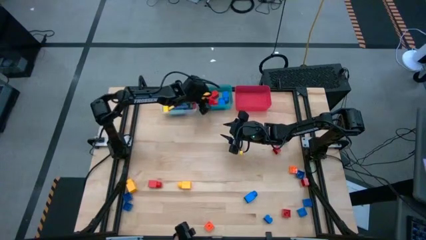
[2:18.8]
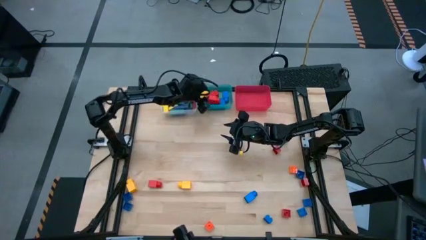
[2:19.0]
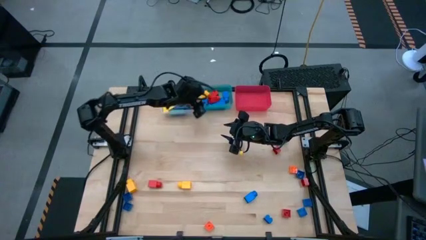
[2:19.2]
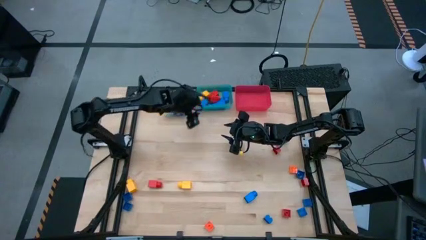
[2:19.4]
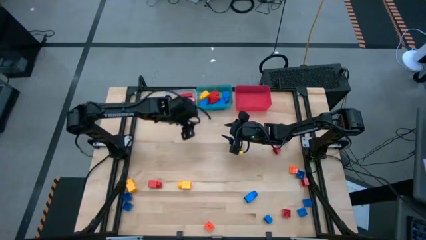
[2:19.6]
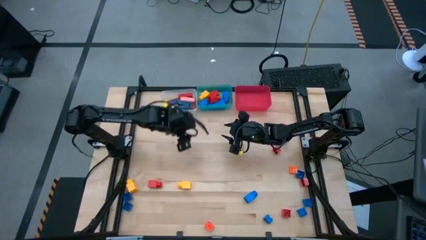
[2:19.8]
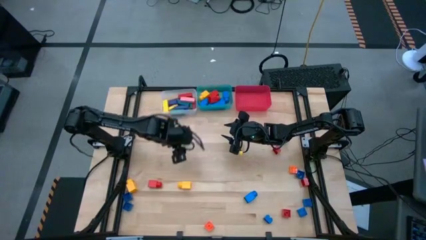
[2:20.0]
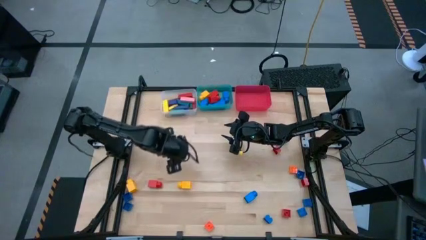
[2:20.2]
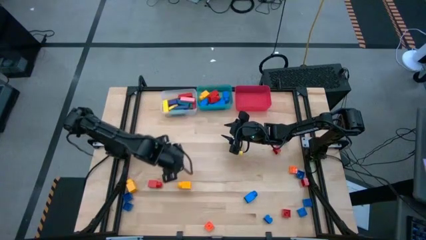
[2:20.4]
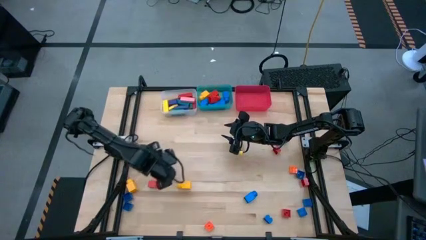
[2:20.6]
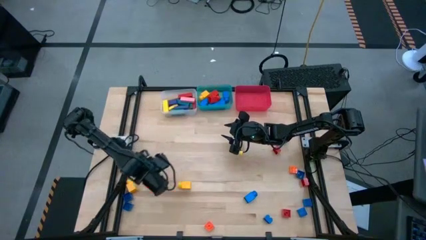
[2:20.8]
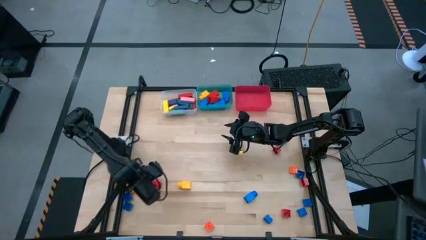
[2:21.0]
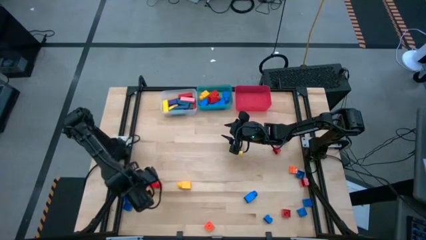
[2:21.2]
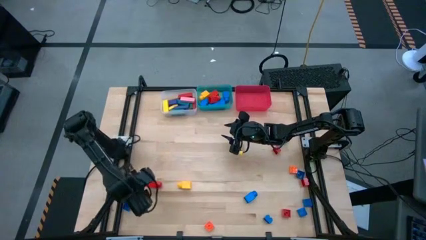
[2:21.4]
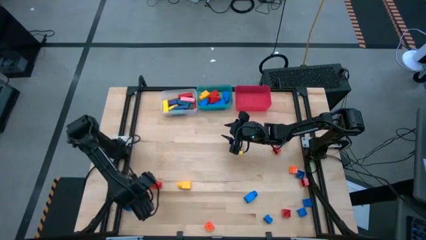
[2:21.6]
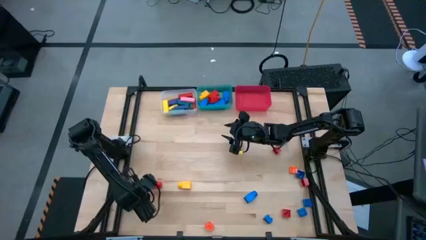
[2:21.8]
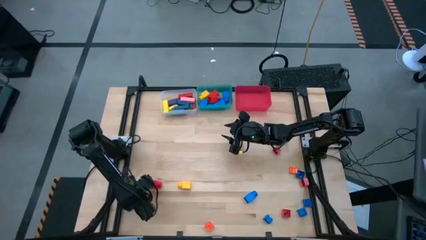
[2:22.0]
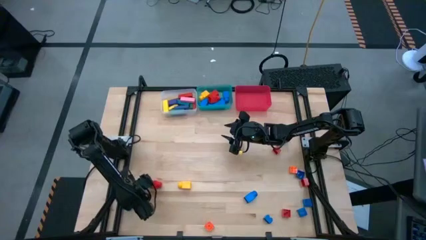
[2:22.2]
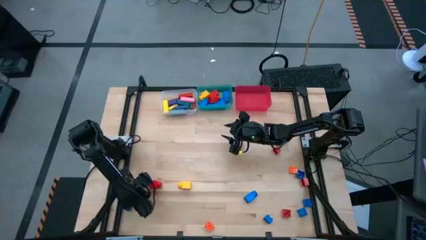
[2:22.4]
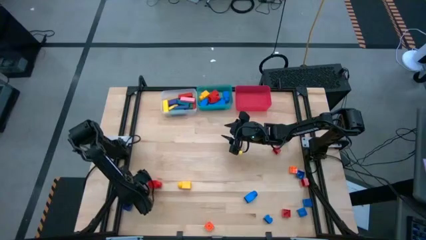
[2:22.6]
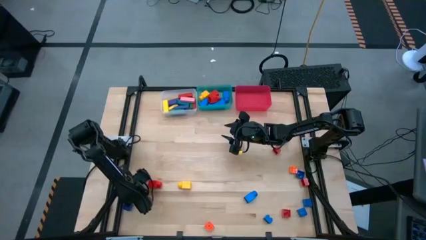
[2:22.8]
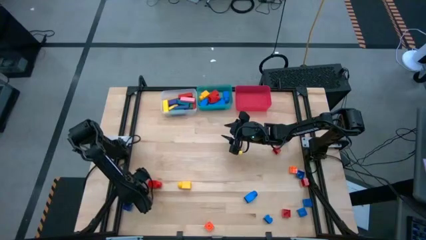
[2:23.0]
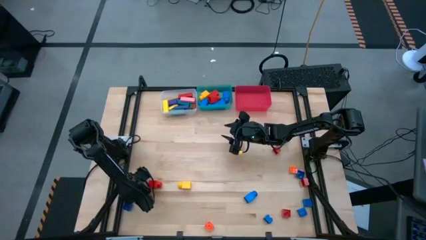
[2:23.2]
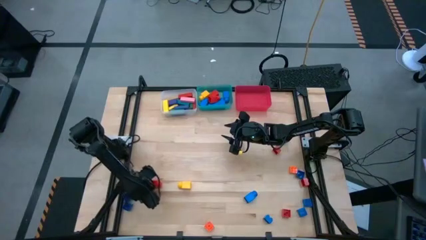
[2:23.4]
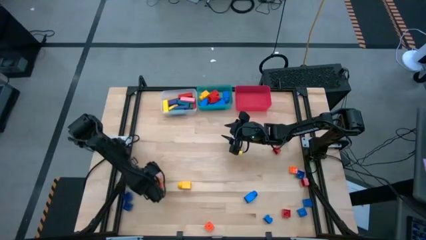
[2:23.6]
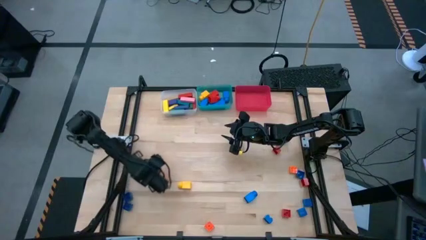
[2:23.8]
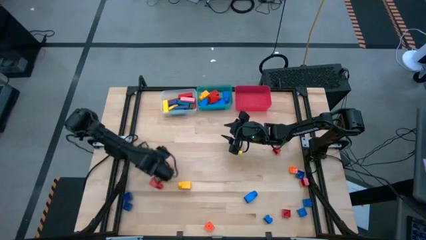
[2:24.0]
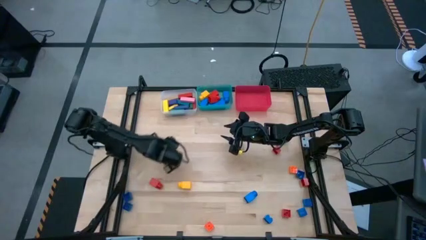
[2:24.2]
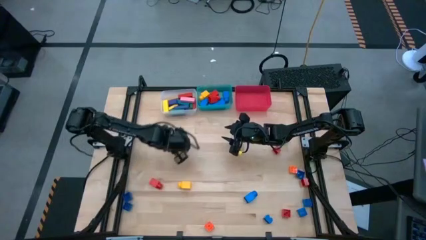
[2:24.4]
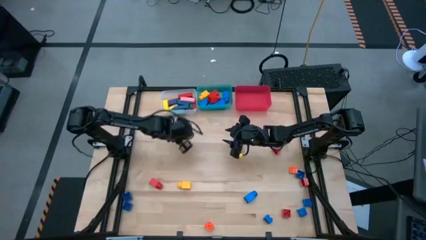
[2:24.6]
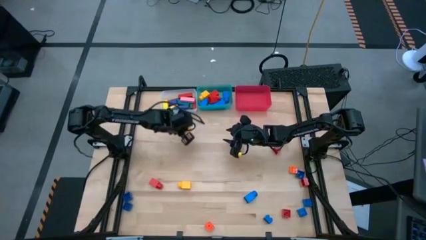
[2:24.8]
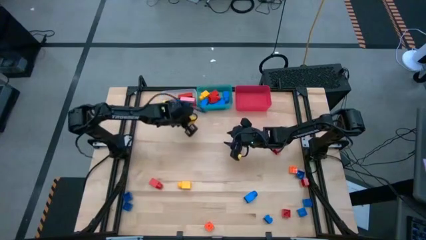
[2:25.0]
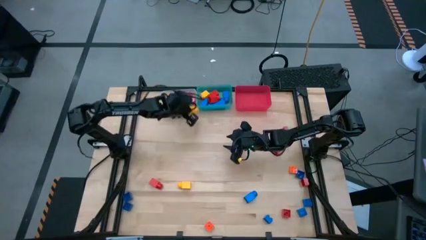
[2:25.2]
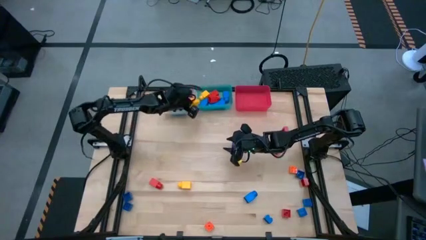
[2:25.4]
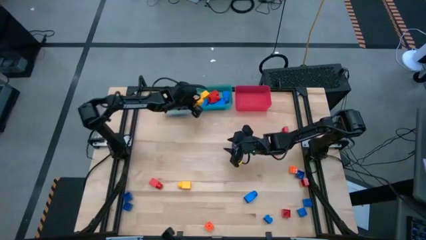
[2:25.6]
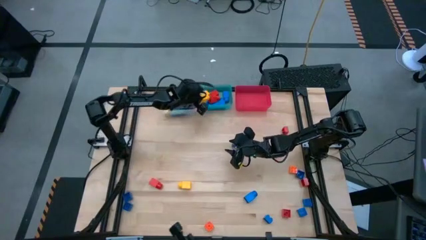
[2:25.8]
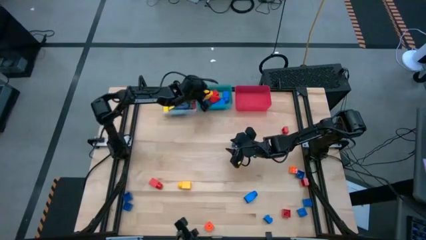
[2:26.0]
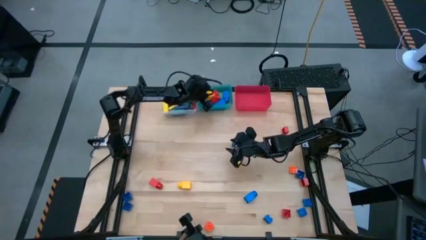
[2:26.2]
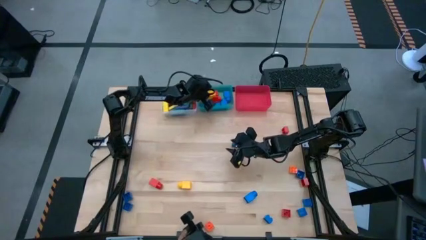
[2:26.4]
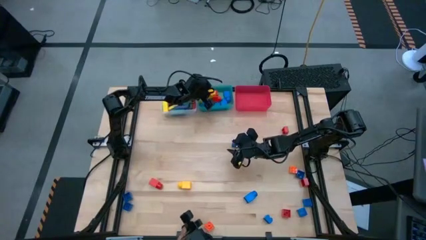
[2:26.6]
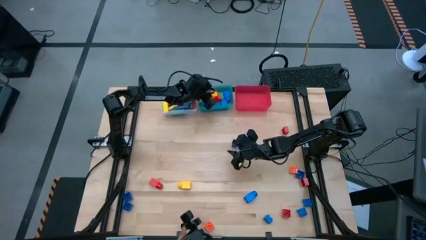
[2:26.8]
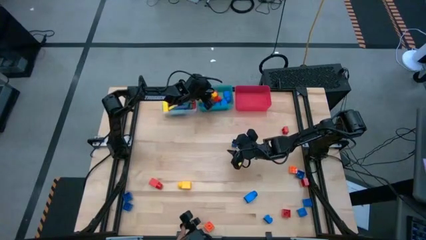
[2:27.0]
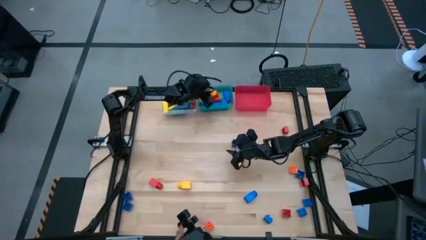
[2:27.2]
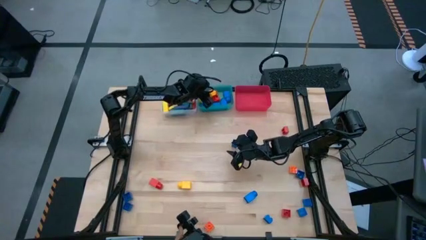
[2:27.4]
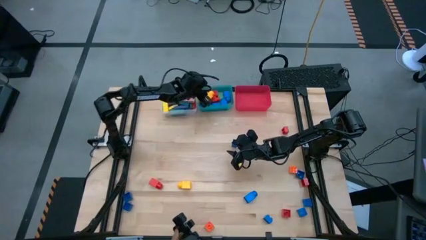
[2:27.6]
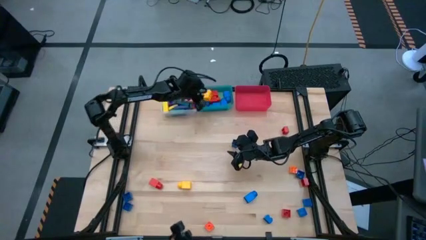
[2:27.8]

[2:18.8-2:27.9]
Task: Sort blocks by size
Put the yellow 1 stud game piece into the green bin

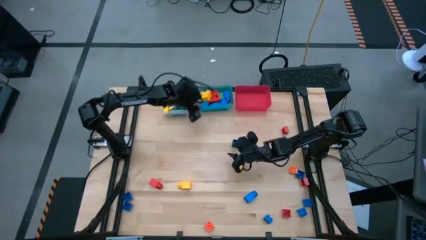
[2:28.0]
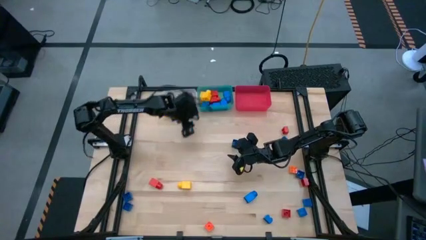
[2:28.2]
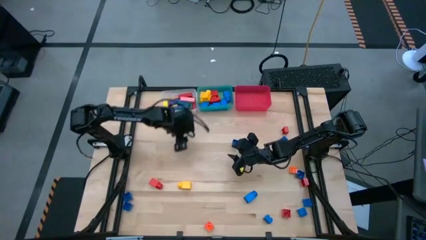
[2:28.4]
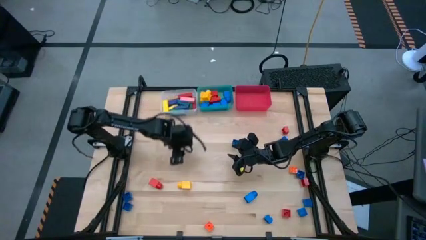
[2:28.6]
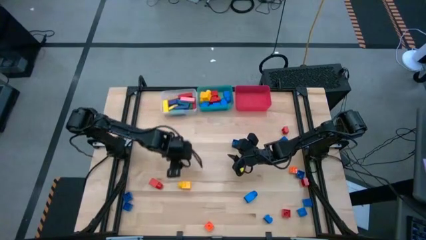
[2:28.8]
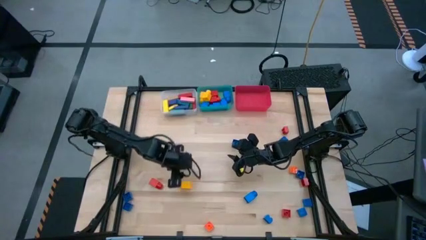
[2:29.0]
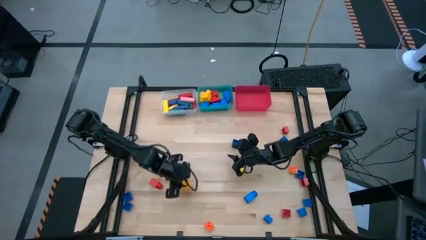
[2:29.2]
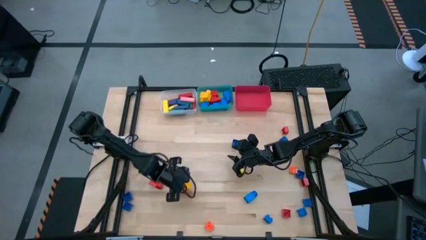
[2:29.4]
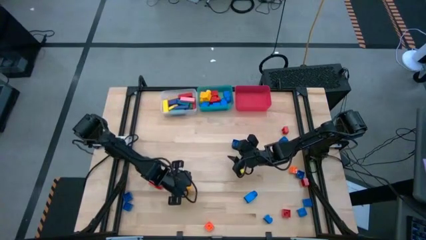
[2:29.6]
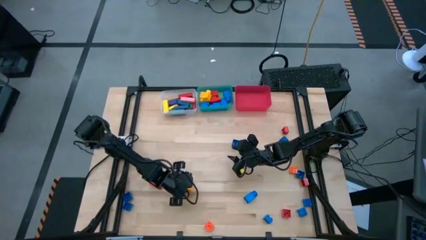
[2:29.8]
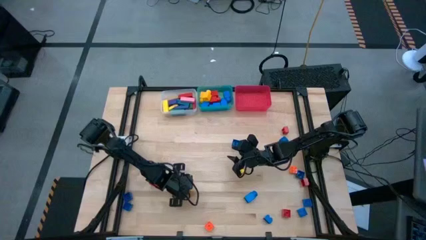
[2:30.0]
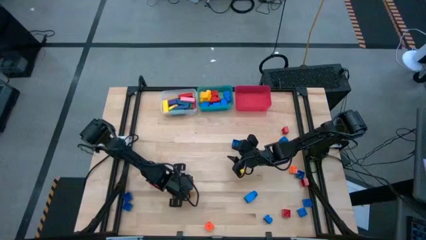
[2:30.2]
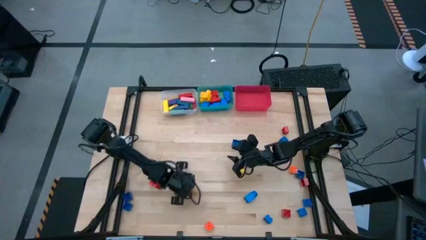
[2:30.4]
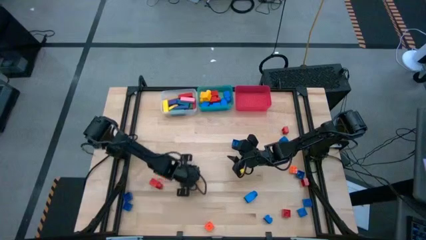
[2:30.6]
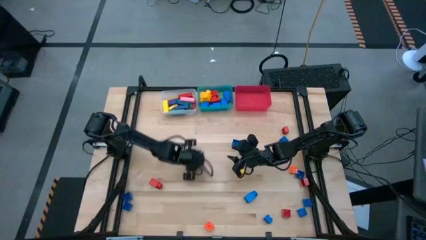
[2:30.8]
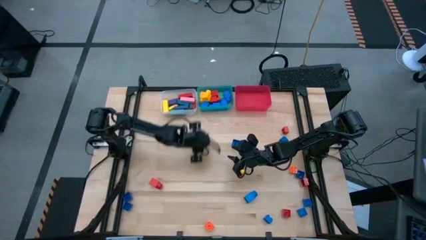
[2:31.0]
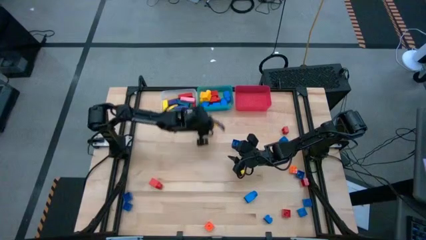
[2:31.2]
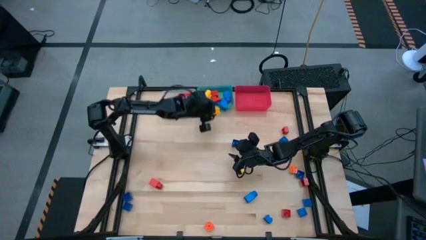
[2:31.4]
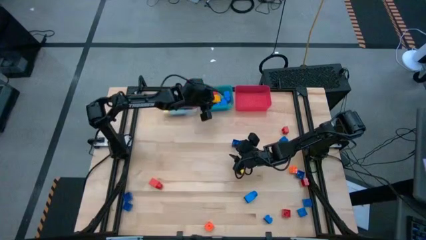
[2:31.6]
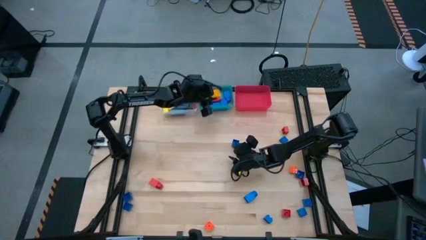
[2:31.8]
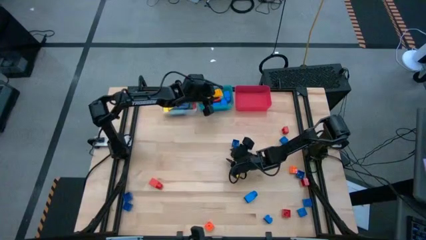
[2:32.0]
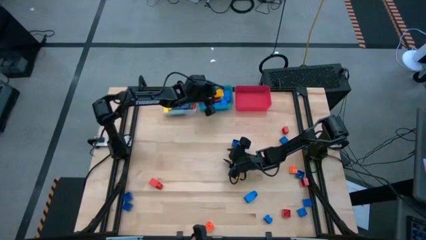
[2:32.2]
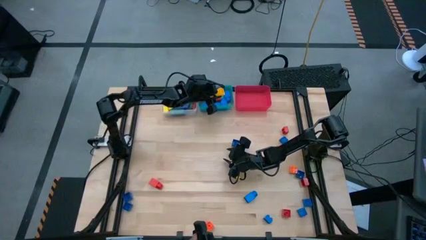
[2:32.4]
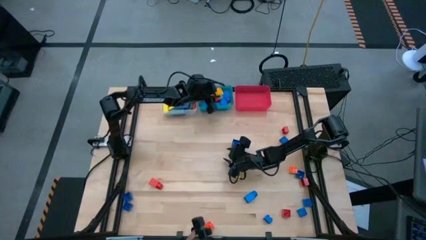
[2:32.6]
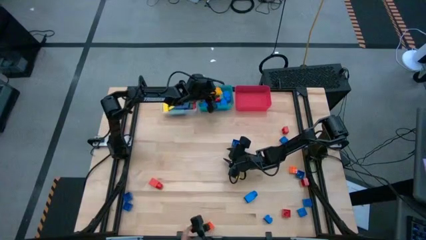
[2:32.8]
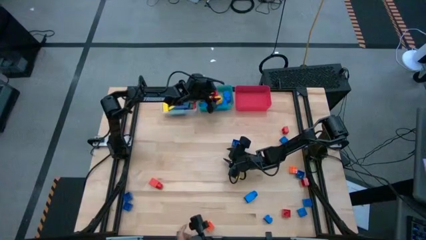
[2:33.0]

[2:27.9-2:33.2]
Put the yellow 1 stud game piece into the green bin

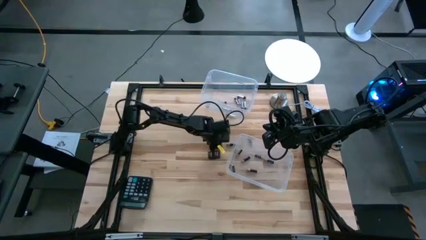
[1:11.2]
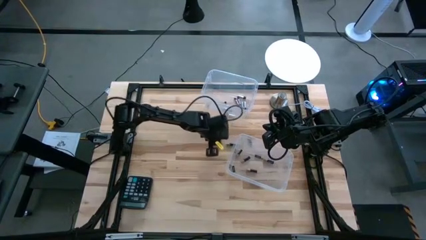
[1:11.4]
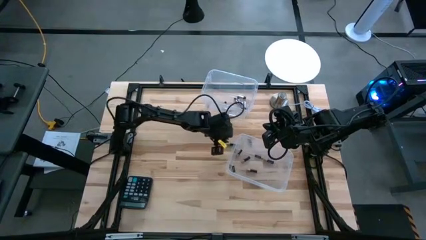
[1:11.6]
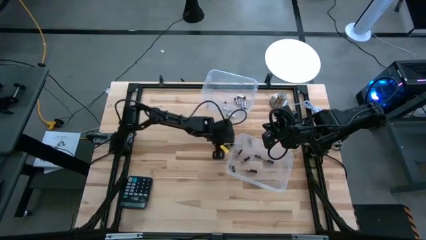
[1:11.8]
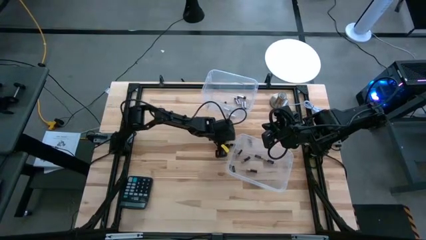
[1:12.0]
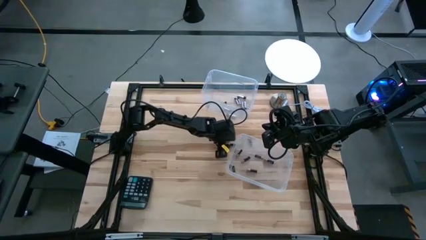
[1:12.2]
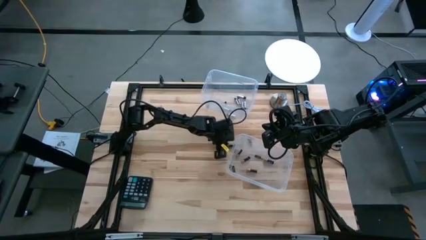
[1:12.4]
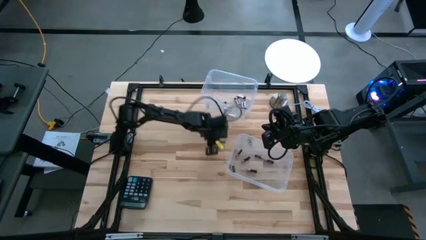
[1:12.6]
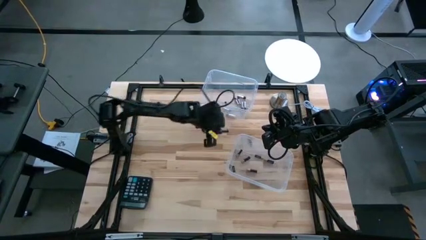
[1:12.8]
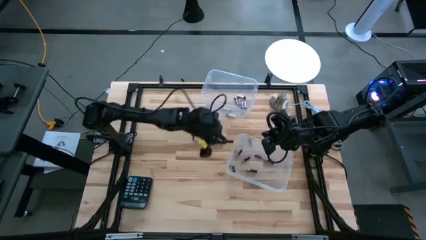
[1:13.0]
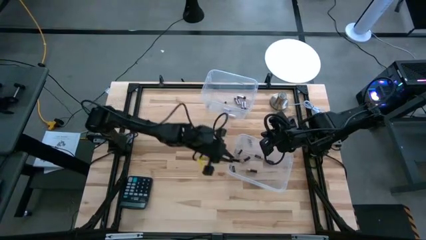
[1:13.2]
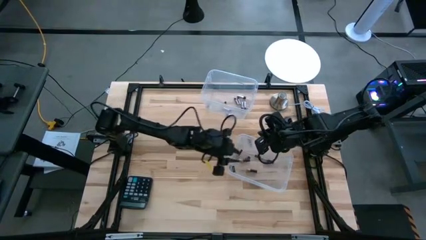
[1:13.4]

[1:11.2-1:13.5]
Task: Sort batteries
Put the black battery into the bottom transparent bin
